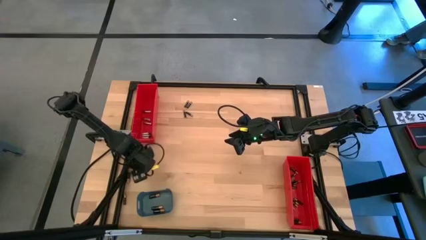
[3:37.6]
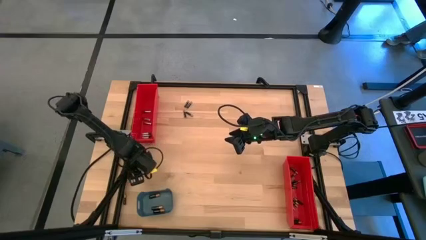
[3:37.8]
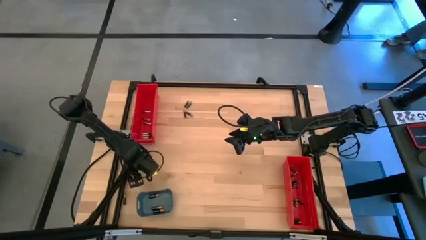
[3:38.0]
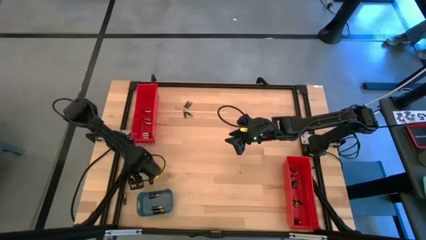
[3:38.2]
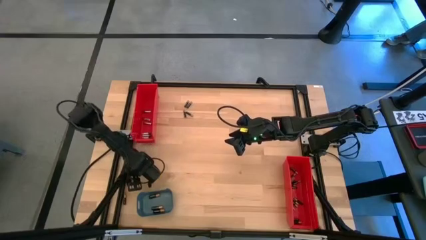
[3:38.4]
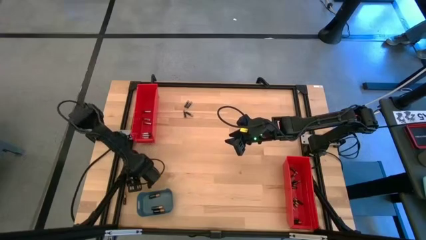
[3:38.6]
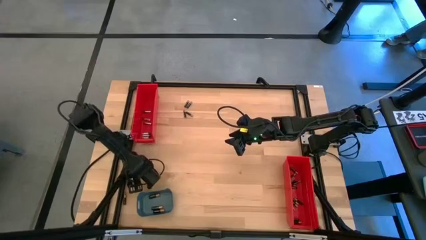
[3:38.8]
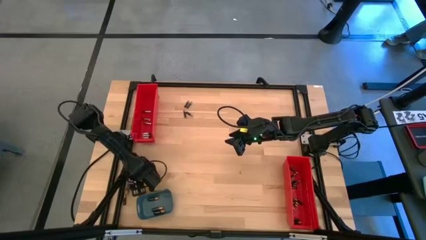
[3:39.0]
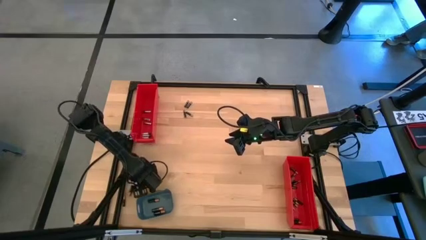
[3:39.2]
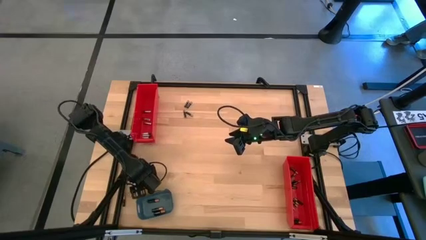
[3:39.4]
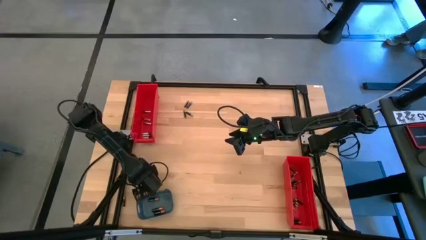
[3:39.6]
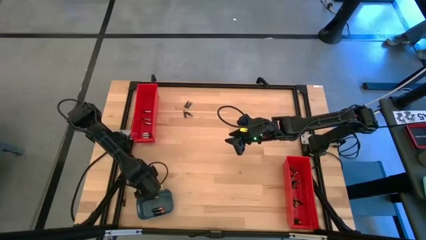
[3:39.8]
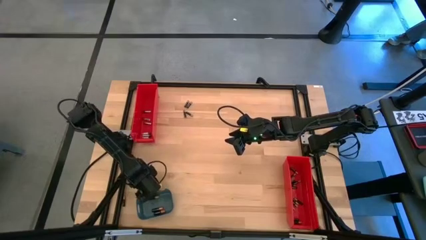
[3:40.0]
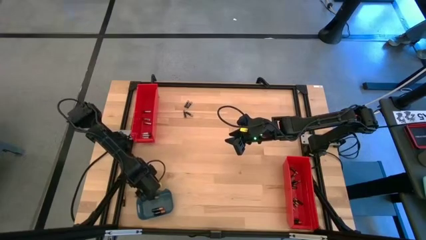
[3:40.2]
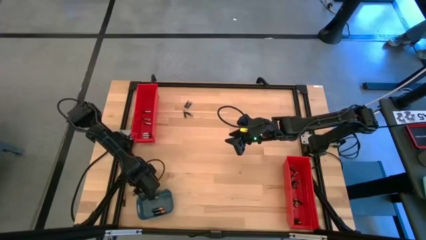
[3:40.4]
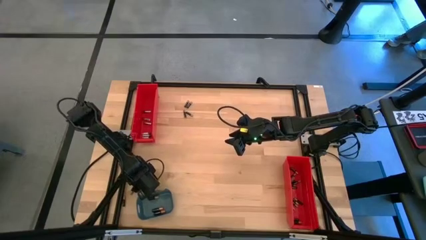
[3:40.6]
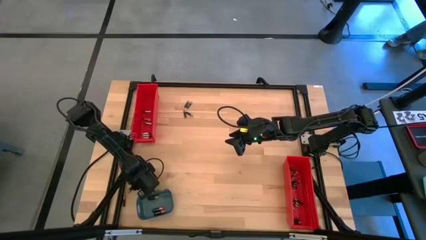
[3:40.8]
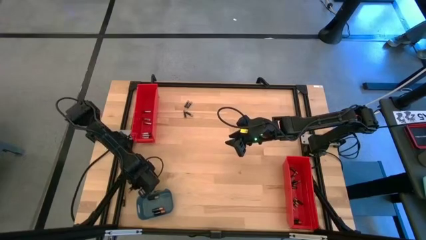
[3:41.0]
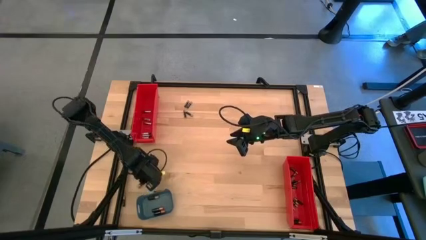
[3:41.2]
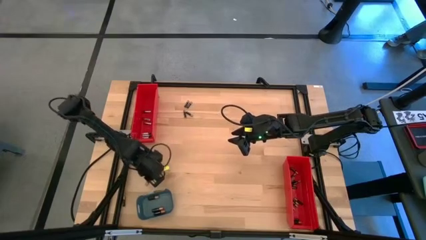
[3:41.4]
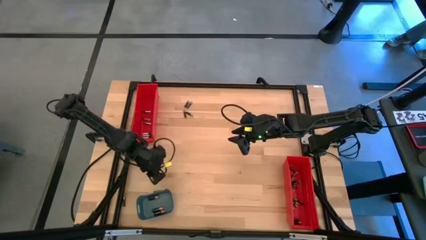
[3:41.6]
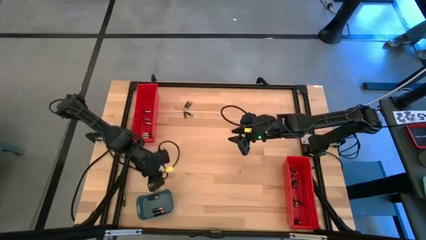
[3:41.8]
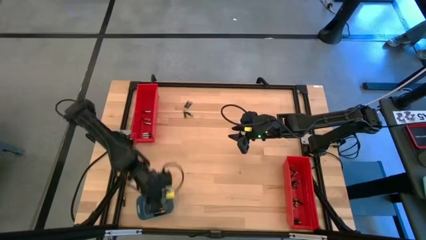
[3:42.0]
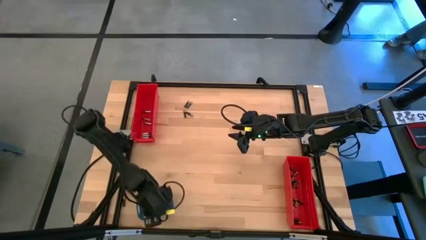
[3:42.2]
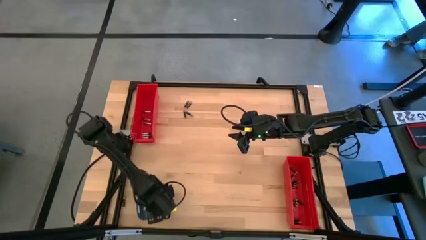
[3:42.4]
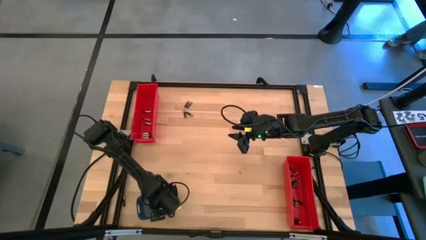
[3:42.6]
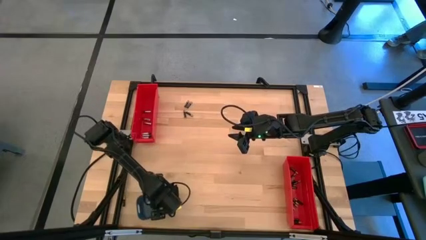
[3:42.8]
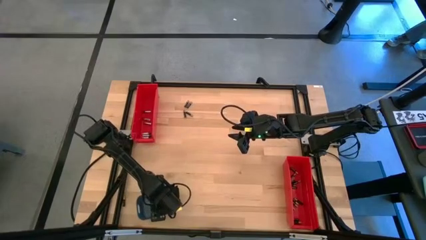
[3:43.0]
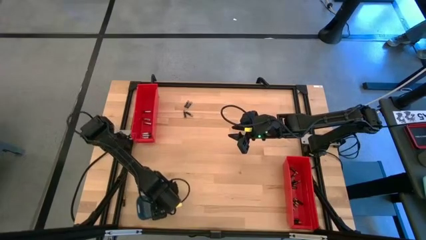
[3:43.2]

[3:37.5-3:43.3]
Task: Sort batteries
Put the large black battery into the blue bin

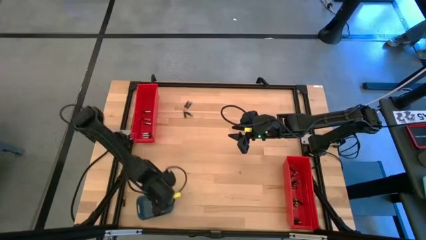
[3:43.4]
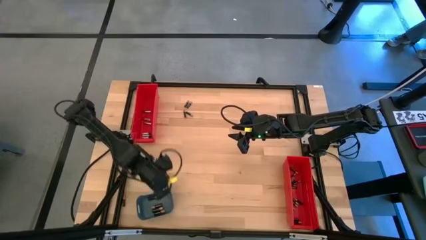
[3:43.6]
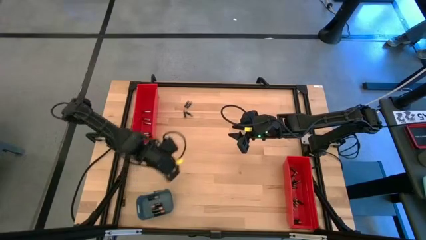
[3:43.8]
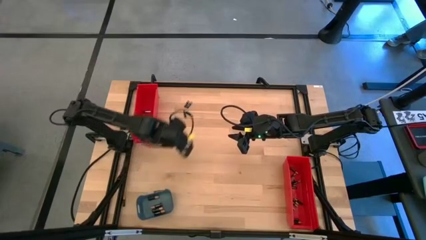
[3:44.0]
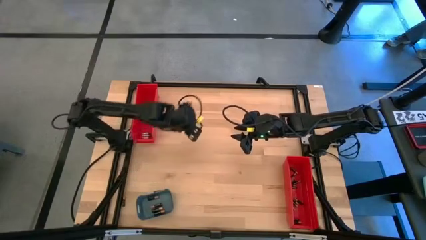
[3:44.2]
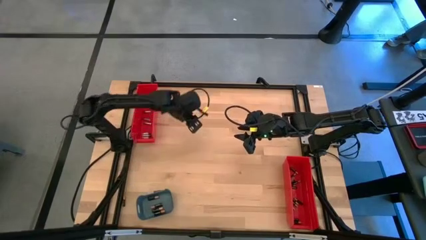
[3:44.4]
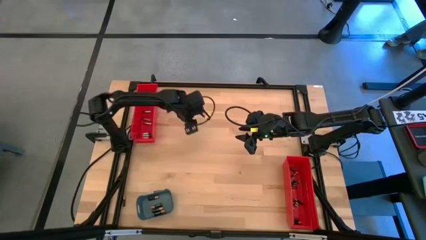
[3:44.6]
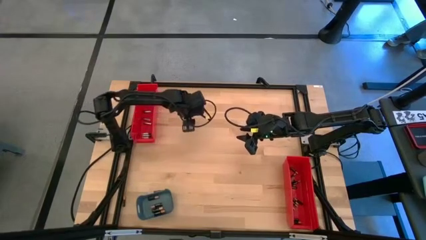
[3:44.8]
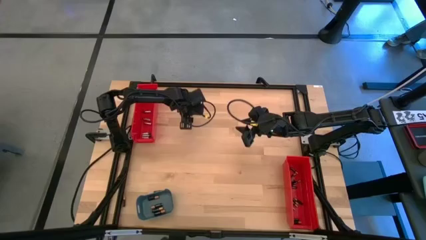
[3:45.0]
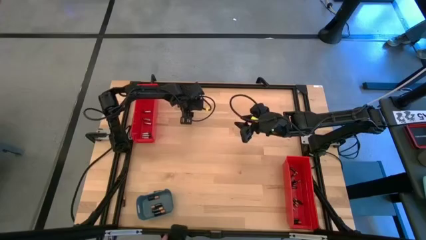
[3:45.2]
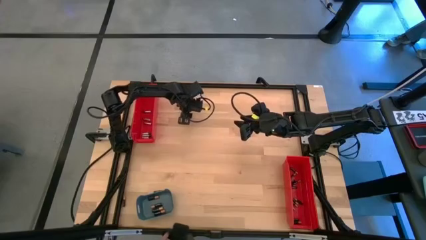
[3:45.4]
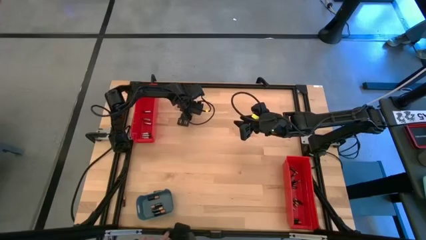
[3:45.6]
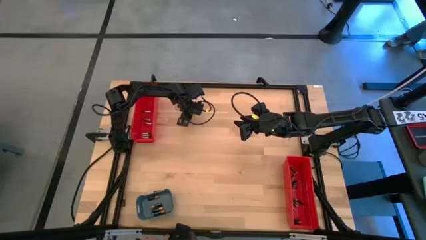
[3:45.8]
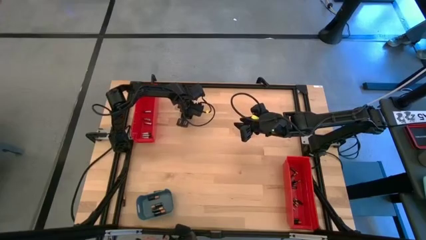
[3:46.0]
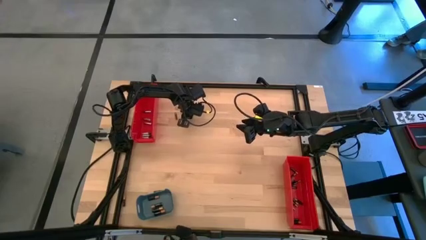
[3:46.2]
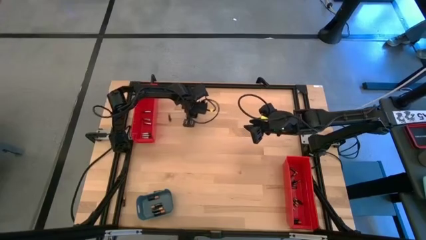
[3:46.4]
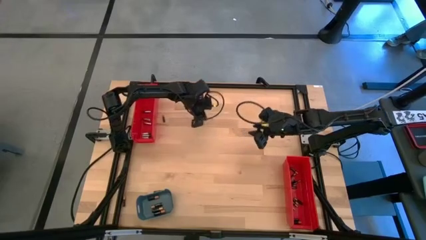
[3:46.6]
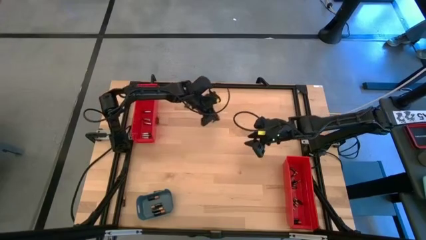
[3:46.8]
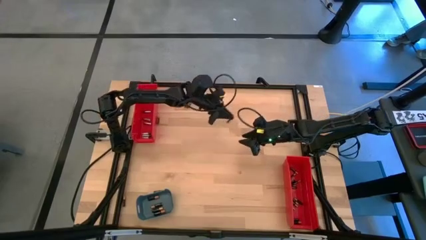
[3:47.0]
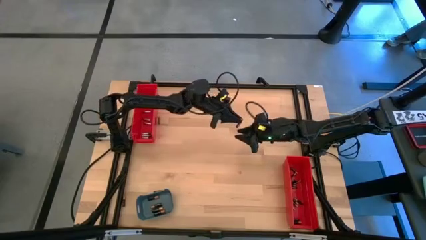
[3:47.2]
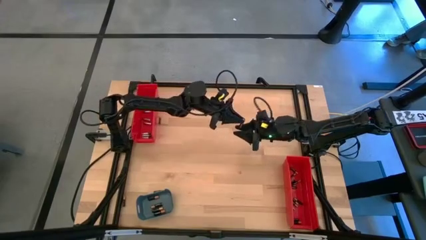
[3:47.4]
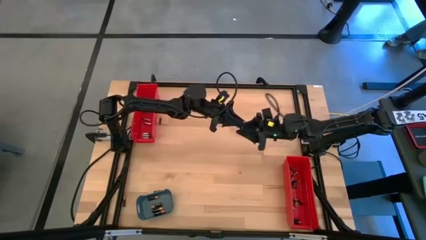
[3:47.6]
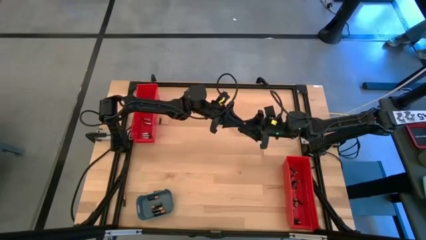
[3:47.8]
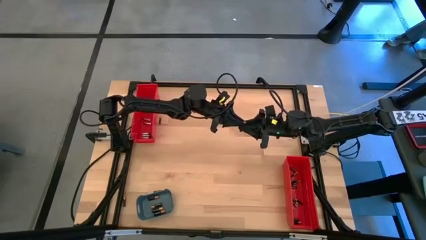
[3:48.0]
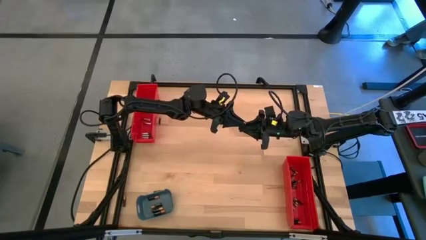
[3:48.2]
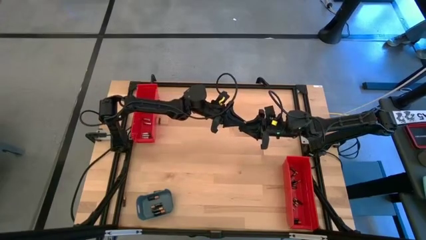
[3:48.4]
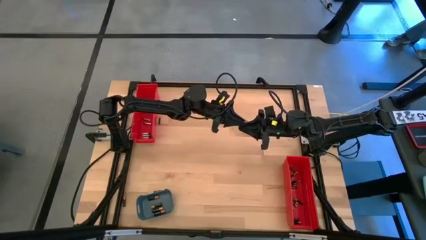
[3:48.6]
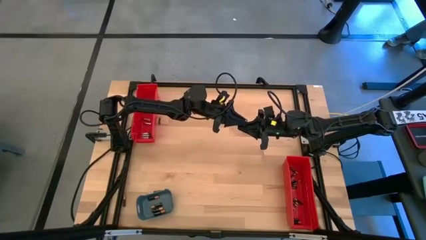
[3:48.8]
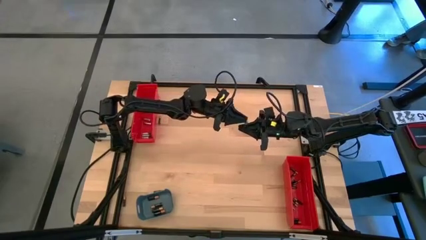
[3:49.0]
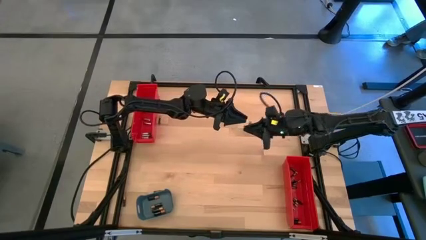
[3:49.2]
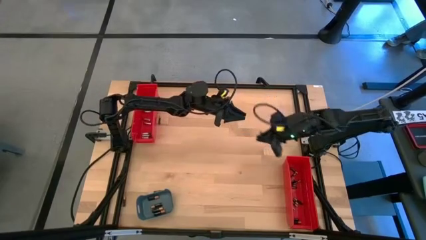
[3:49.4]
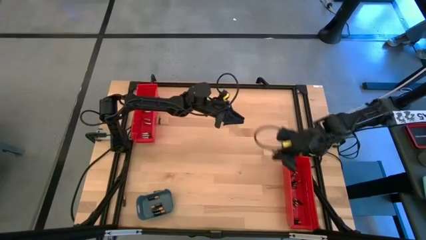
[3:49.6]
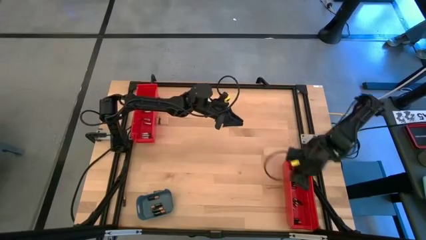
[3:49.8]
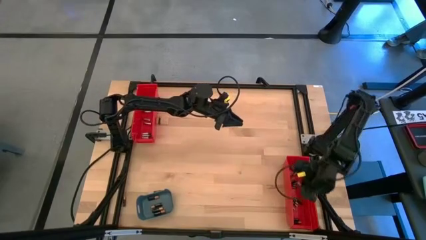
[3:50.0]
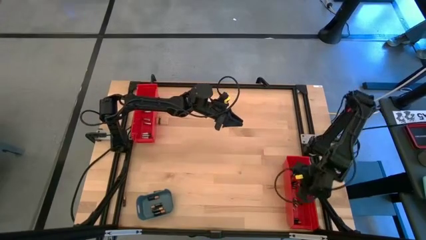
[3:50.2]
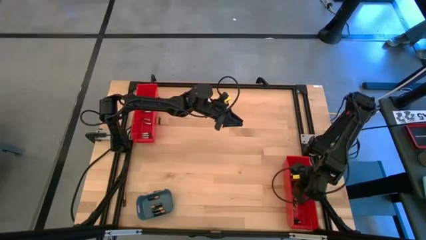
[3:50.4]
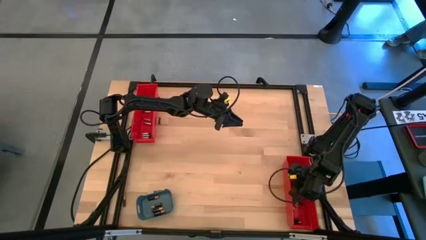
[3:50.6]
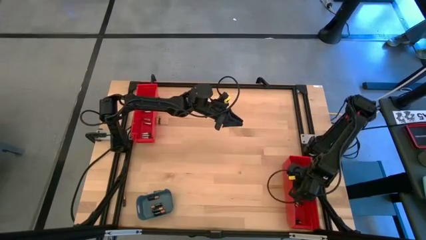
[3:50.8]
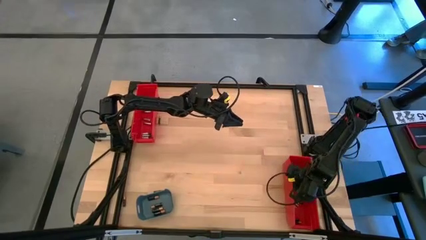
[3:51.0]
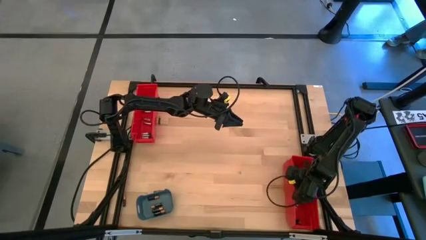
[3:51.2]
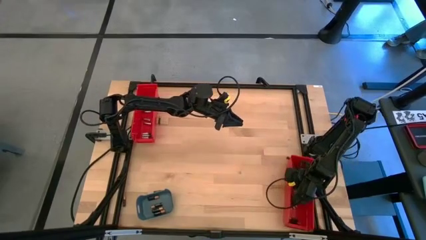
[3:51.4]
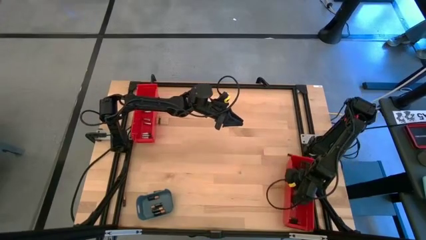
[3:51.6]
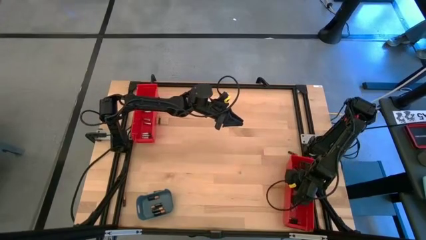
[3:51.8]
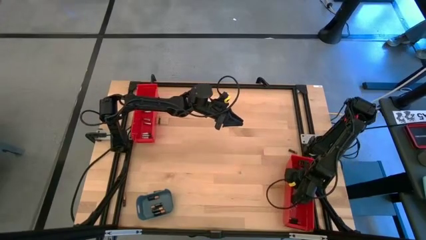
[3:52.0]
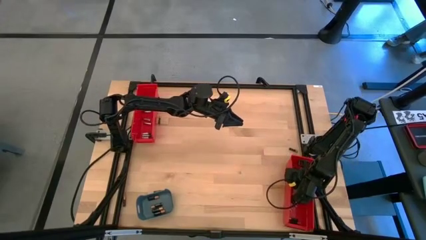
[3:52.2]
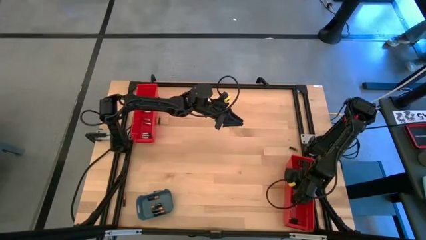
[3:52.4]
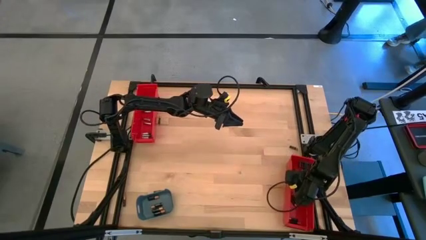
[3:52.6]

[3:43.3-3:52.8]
Put the small black battery into the bottom red bin
